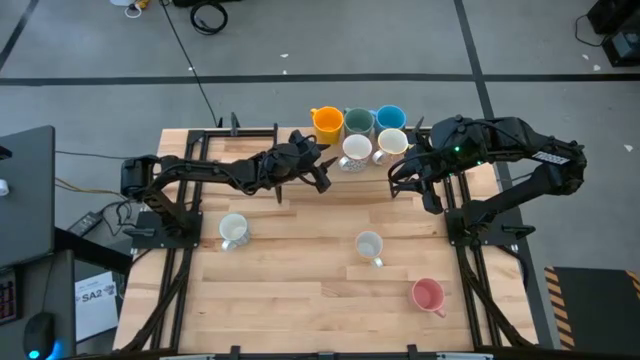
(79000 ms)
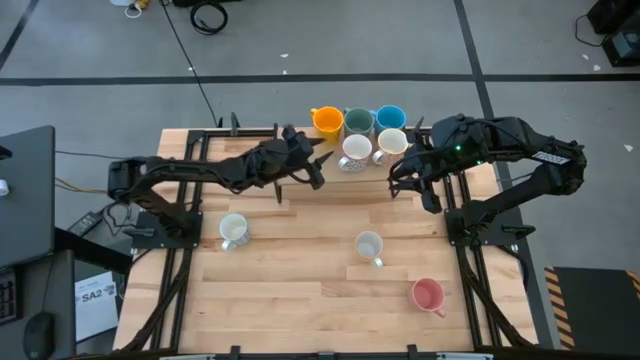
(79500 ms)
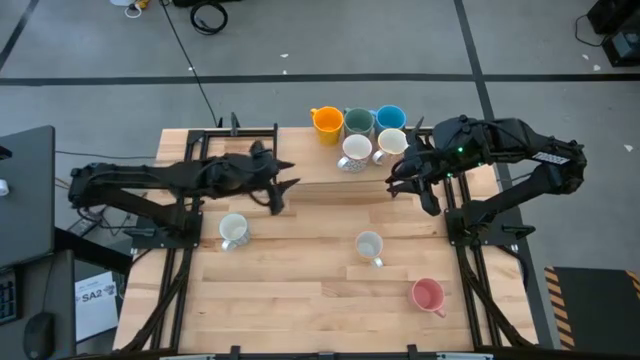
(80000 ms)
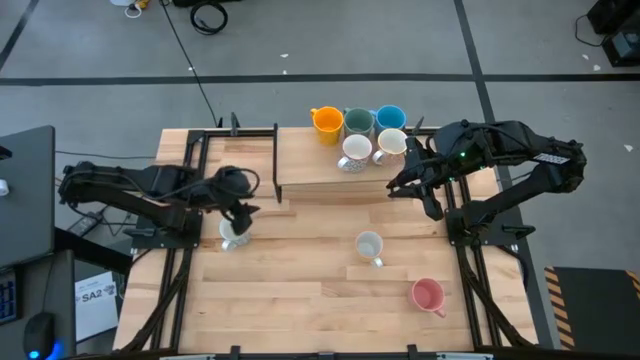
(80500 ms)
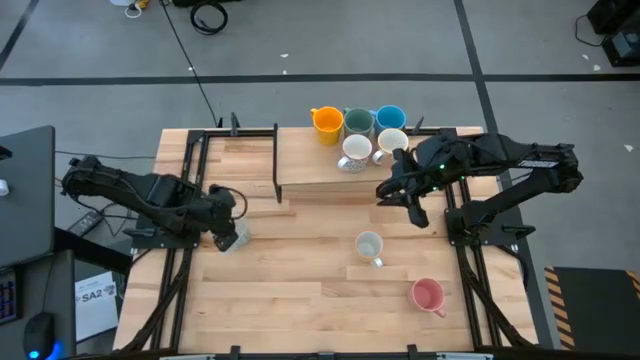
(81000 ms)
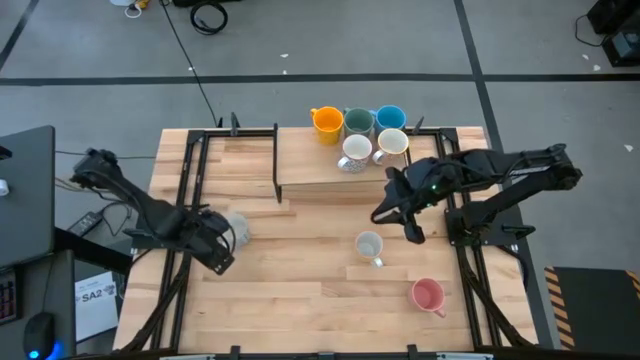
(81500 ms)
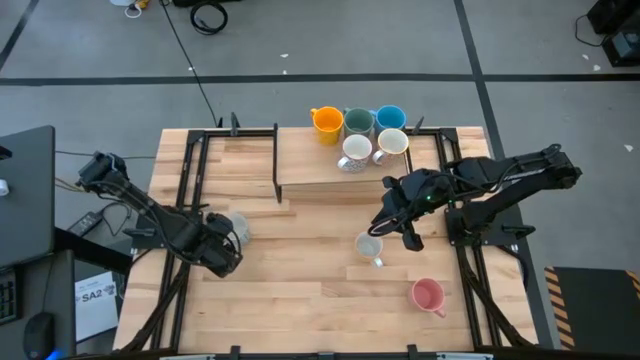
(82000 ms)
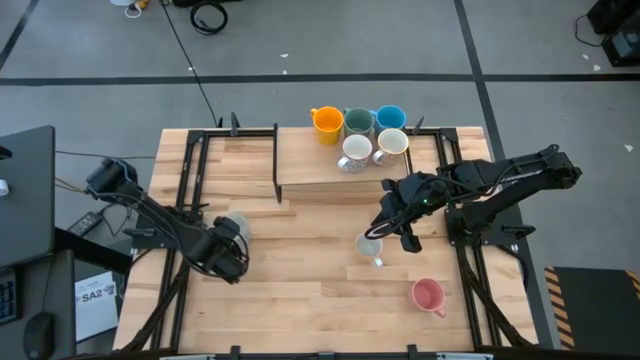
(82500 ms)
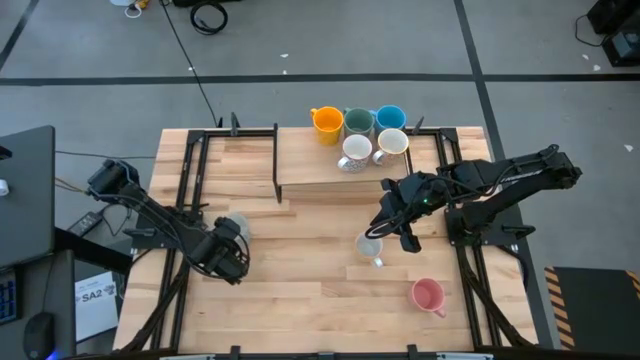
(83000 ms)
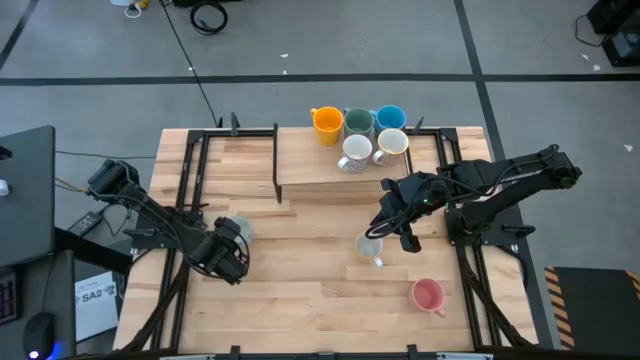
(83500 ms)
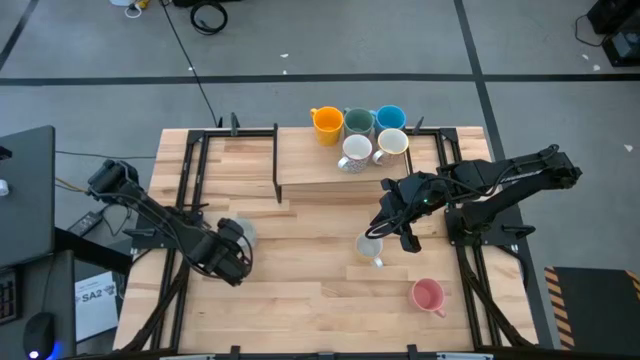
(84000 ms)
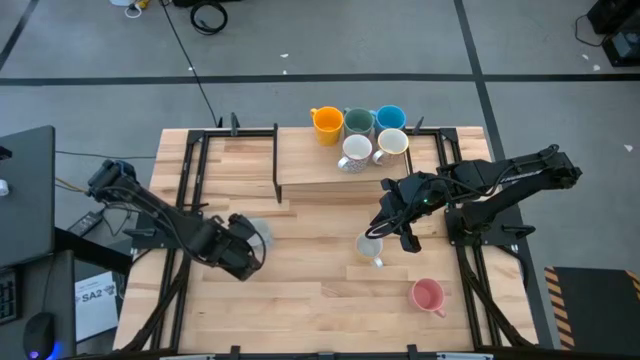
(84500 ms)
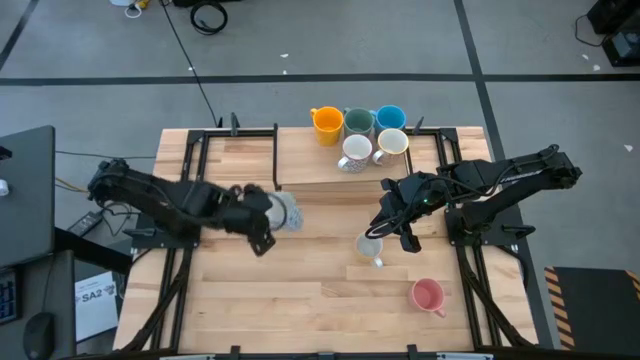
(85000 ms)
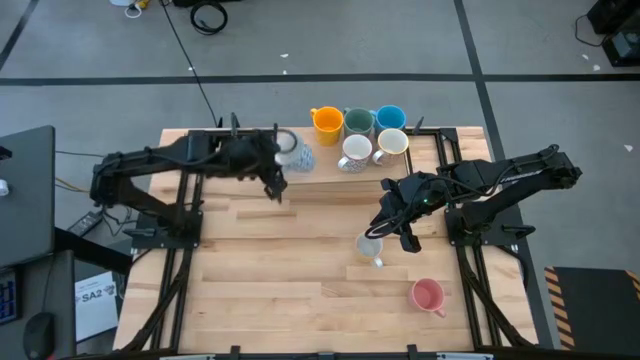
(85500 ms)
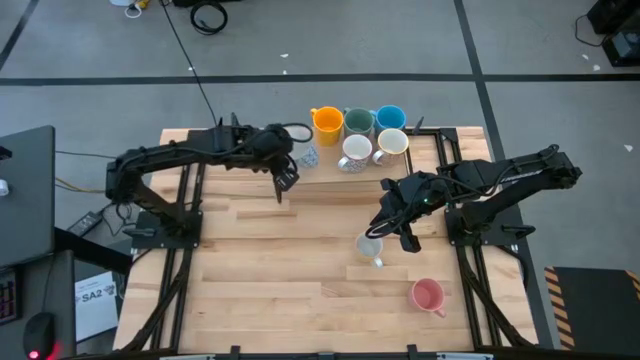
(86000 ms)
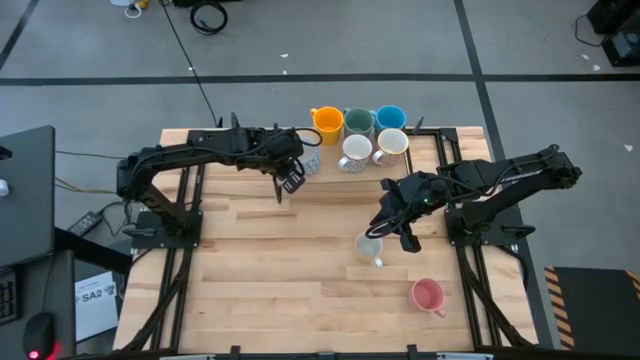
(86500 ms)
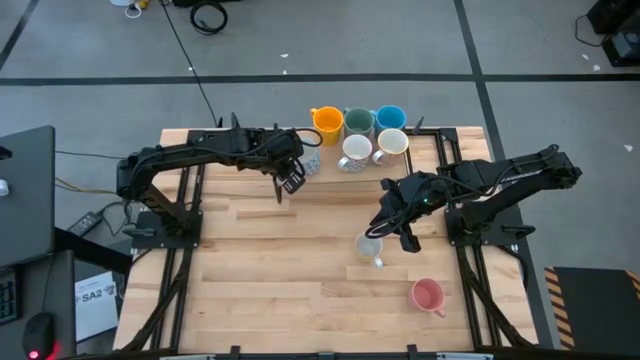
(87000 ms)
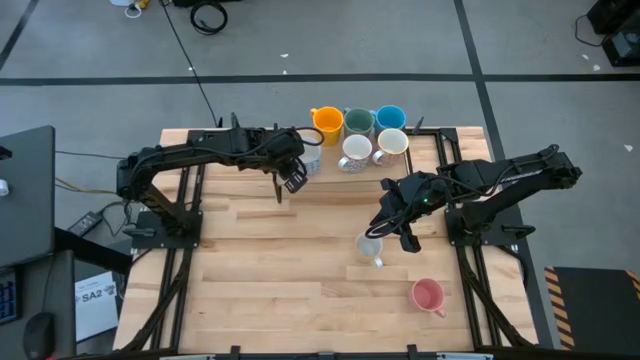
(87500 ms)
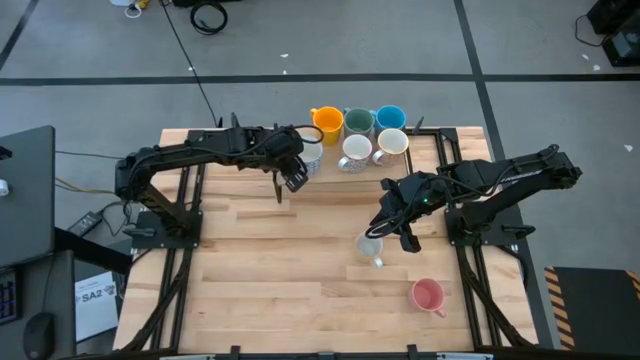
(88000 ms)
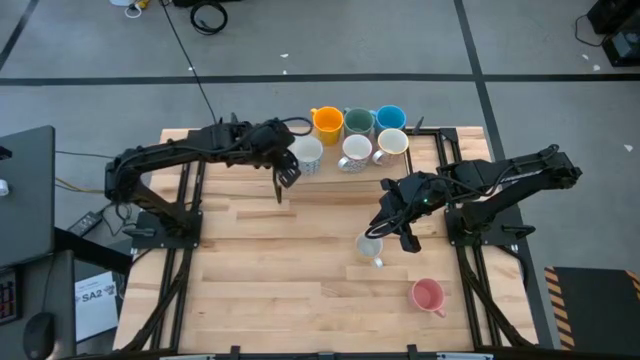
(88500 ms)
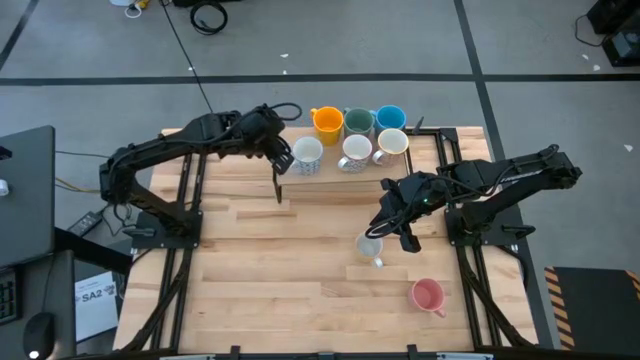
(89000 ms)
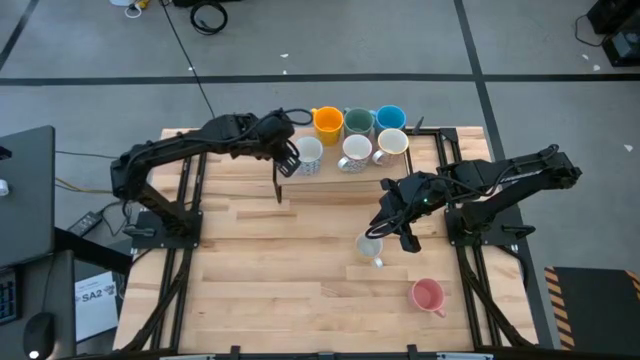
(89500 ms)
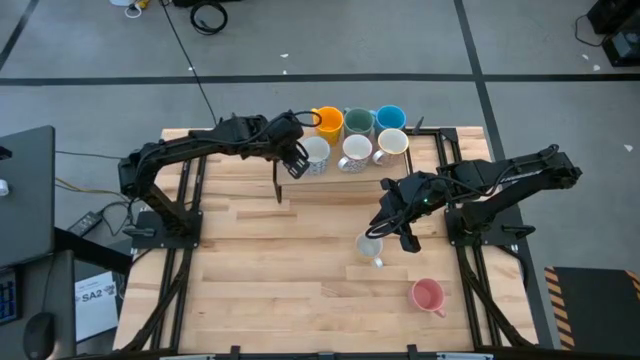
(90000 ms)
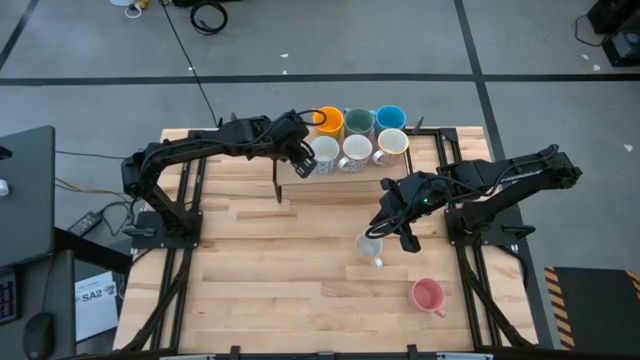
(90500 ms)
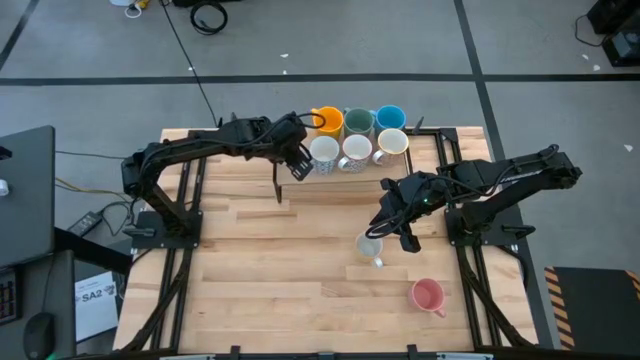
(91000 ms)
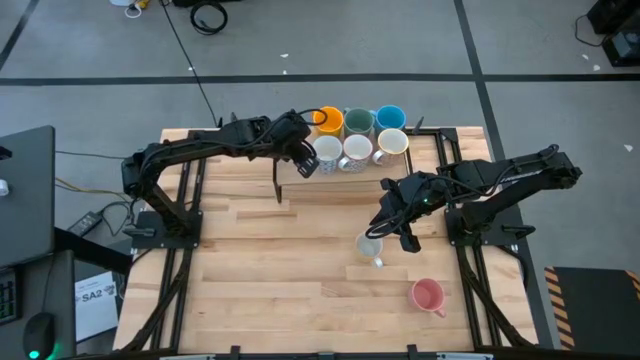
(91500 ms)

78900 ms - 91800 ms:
Task: Place coffee mugs
Put the white-blue mug on the shelf

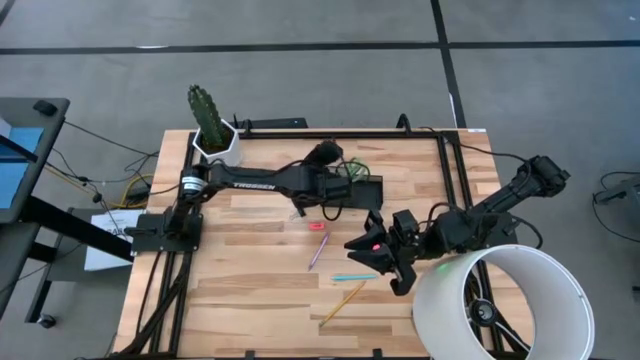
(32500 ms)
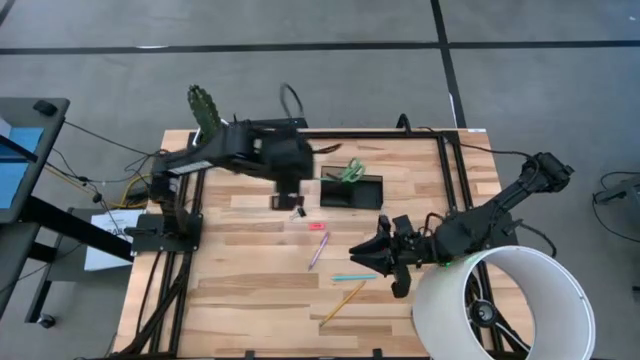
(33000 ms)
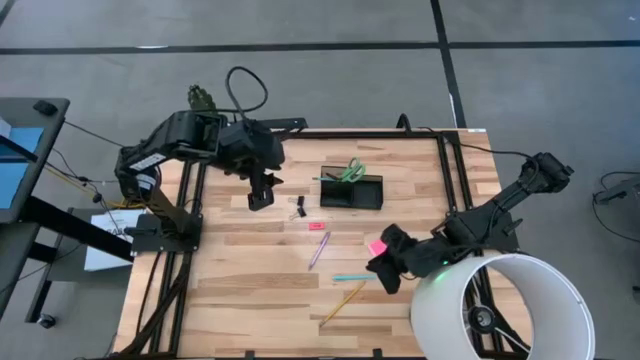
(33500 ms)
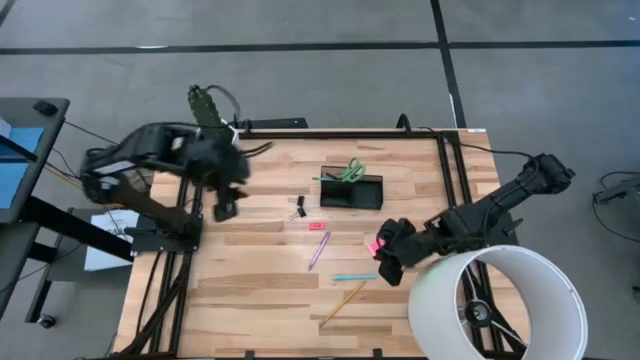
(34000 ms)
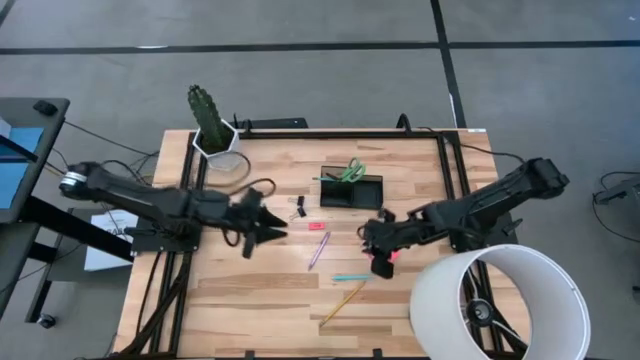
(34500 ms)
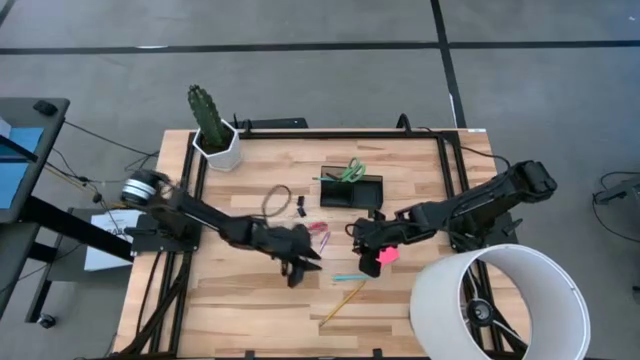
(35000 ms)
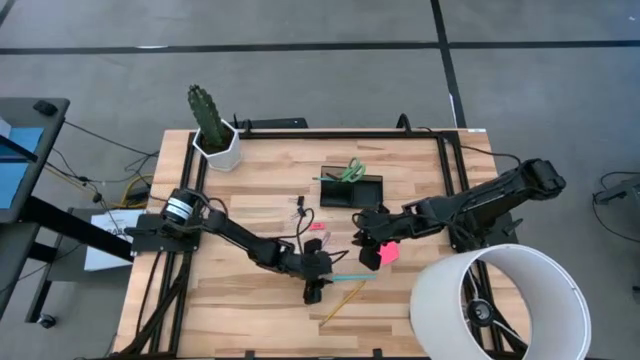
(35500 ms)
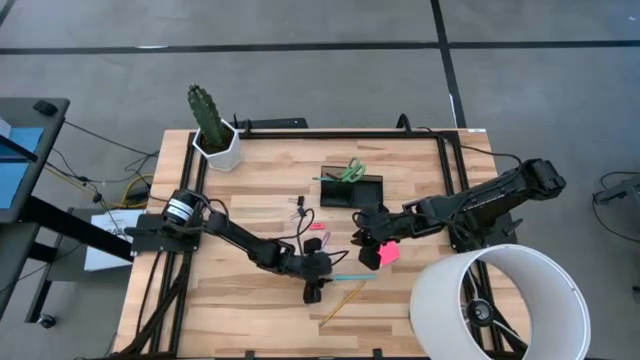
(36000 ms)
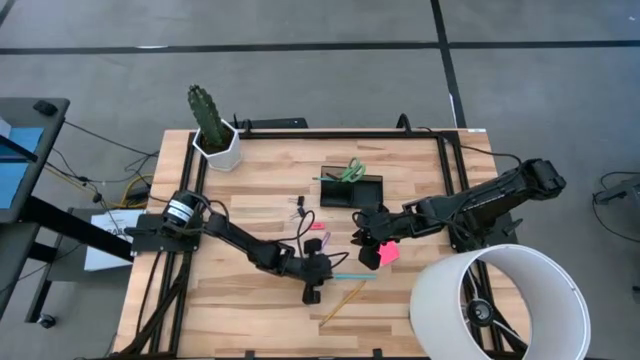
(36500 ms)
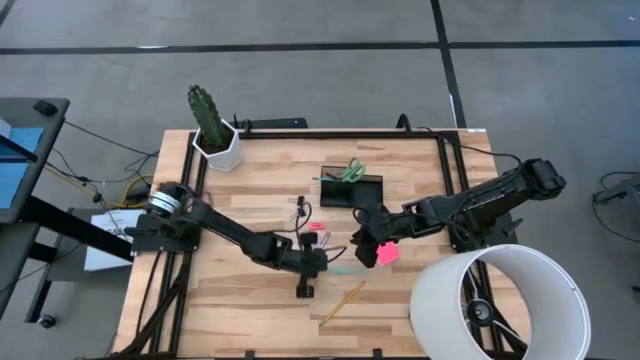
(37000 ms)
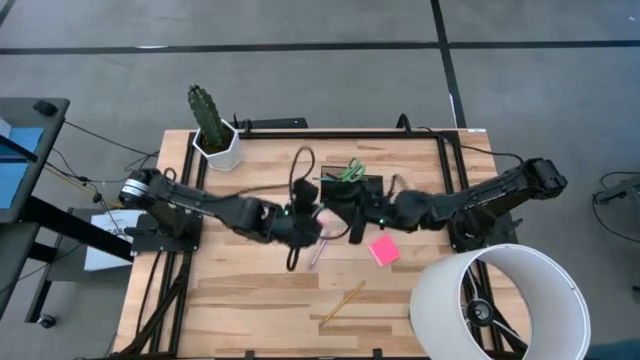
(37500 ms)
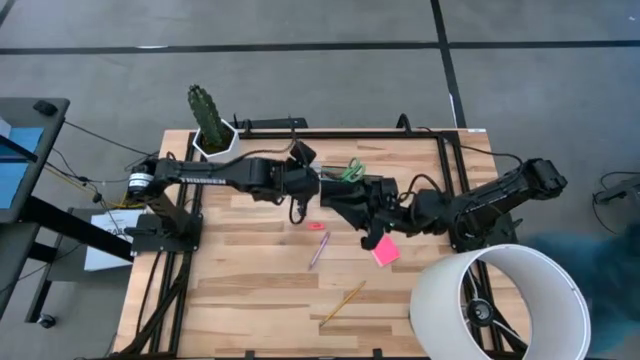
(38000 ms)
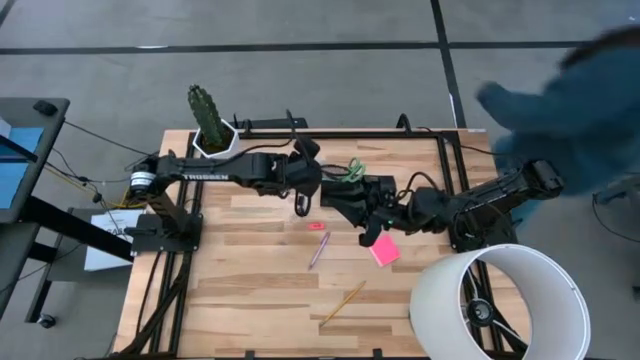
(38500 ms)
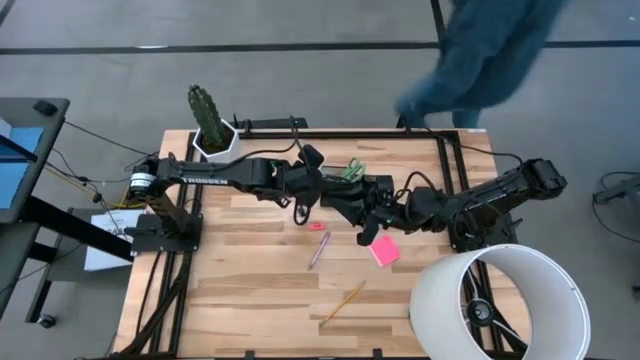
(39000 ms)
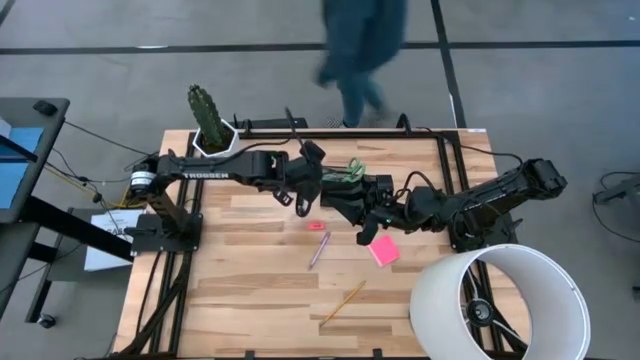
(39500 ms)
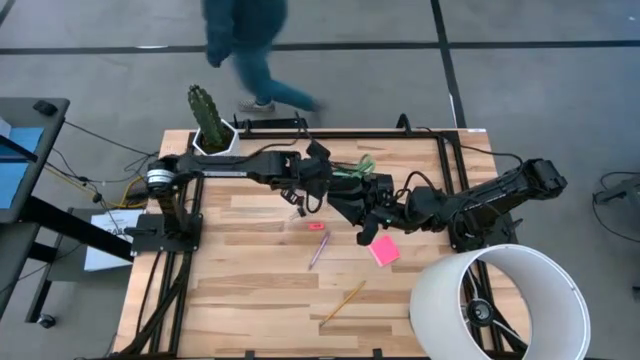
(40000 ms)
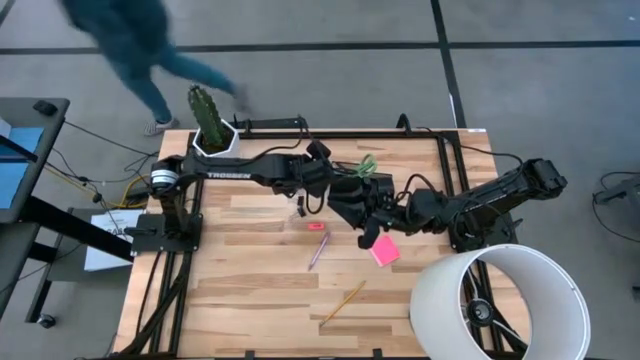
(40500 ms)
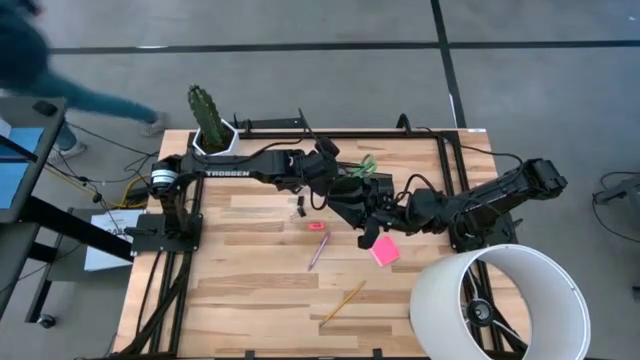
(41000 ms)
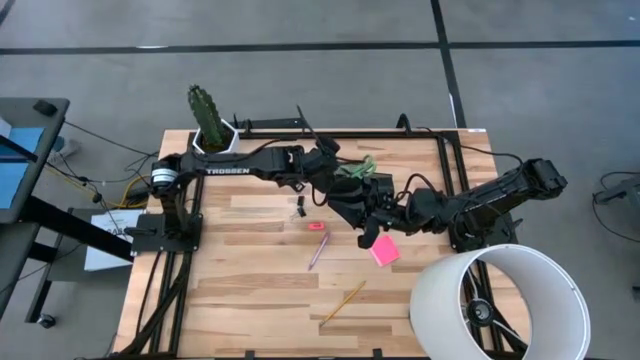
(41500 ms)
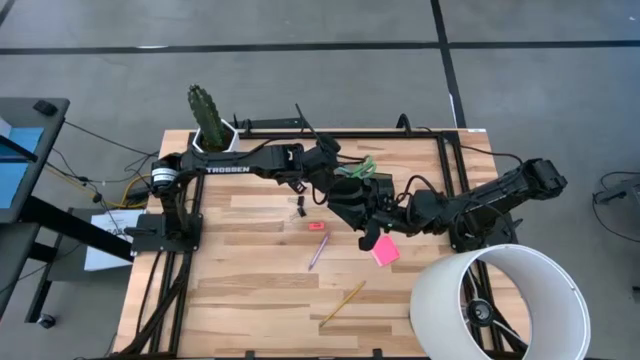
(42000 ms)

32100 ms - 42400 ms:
Task: Pick and place office supplies into organizer
Put the blue pen into the black desk organizer
